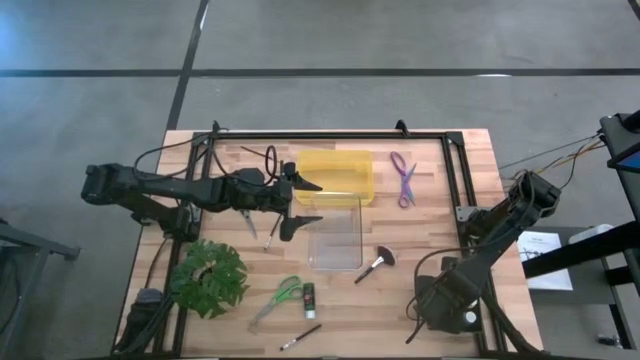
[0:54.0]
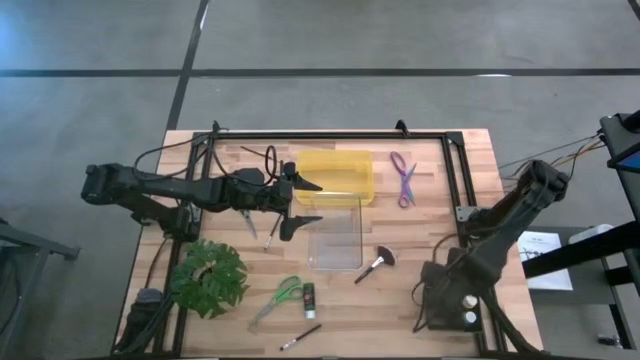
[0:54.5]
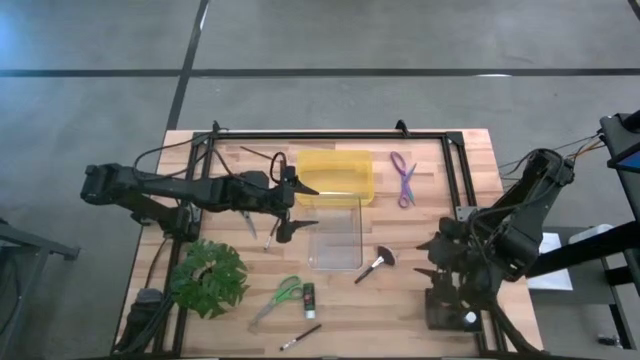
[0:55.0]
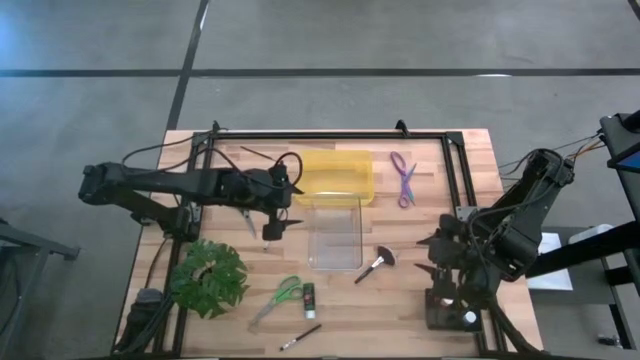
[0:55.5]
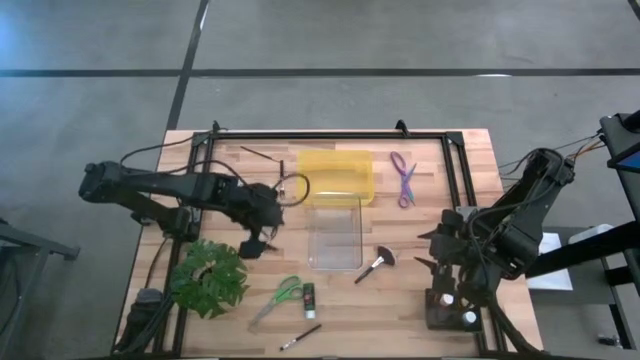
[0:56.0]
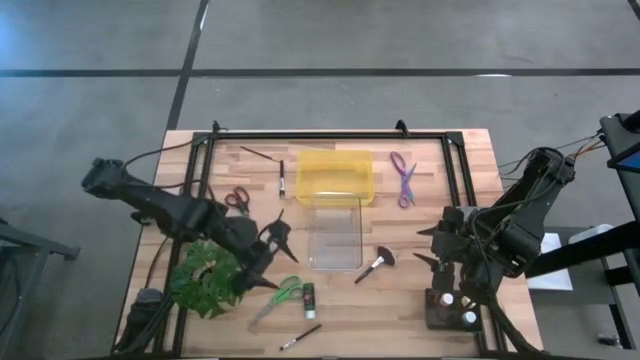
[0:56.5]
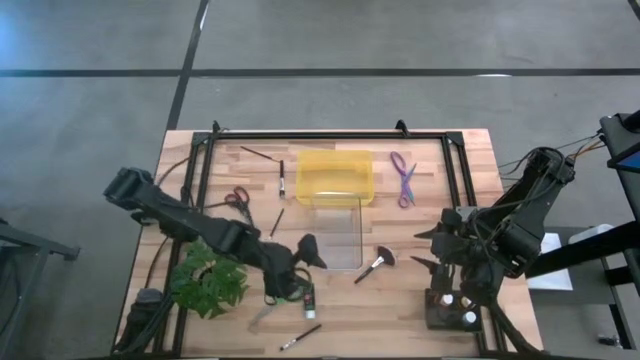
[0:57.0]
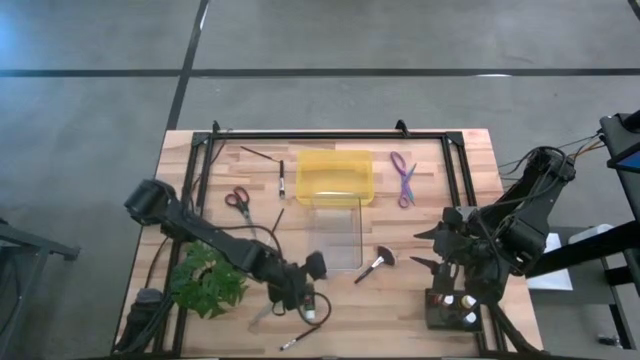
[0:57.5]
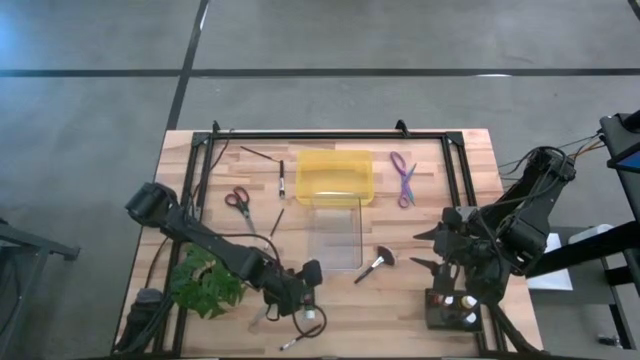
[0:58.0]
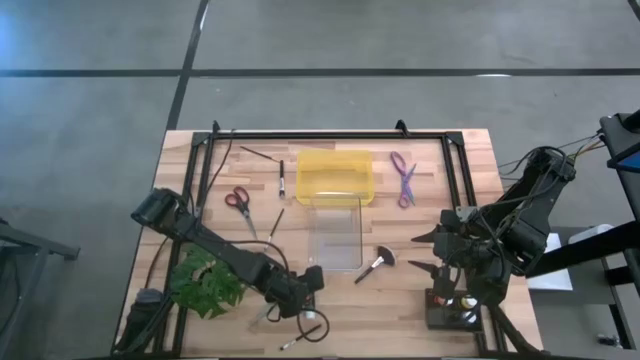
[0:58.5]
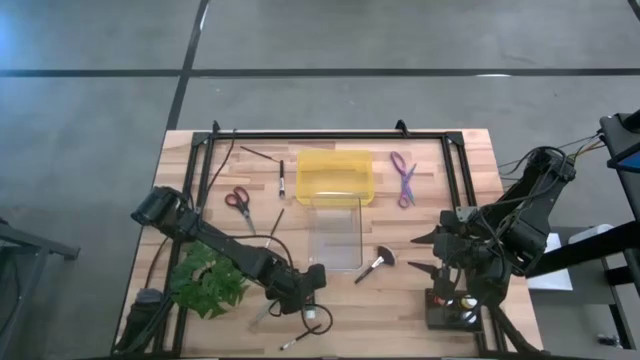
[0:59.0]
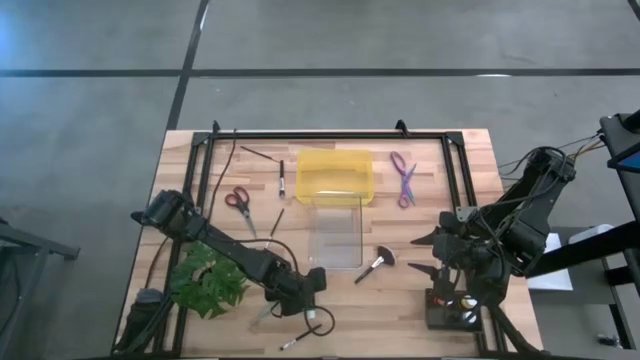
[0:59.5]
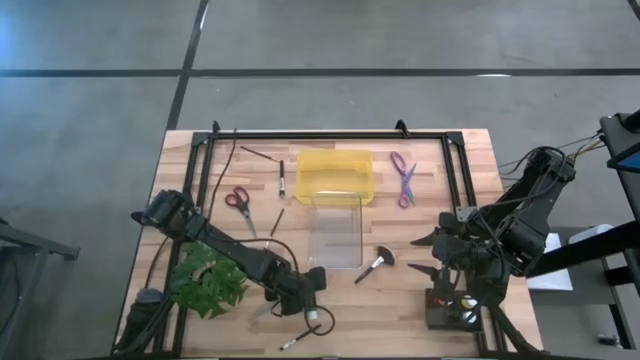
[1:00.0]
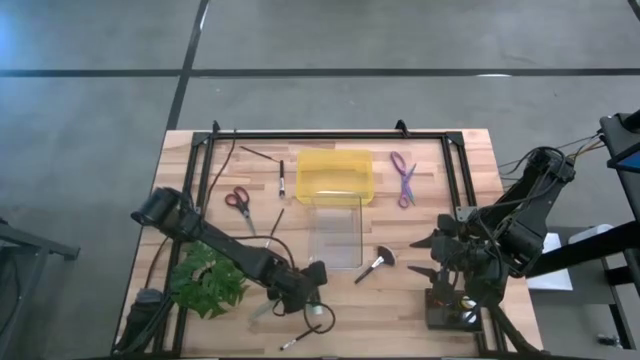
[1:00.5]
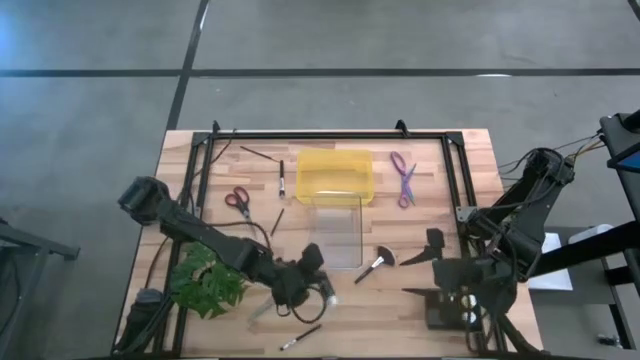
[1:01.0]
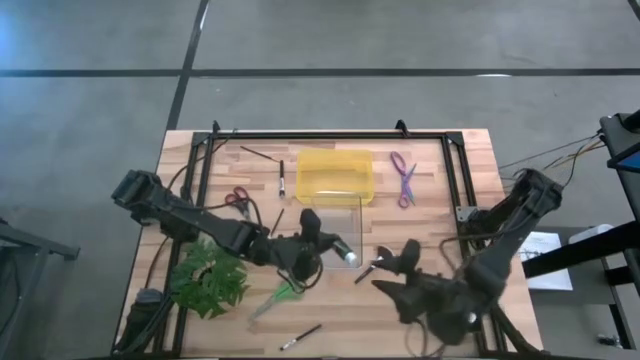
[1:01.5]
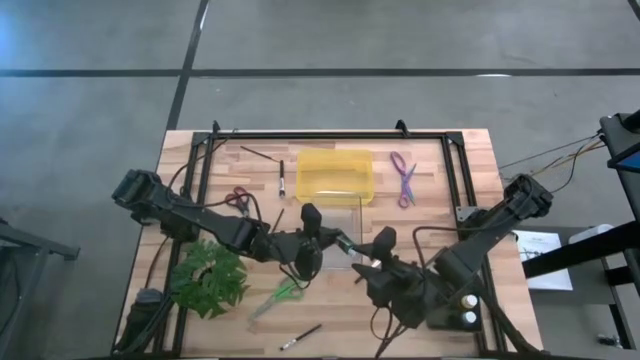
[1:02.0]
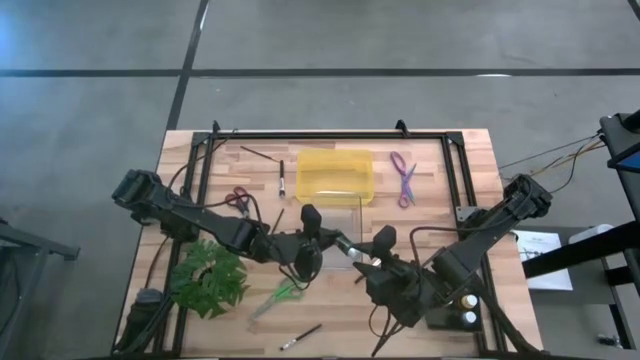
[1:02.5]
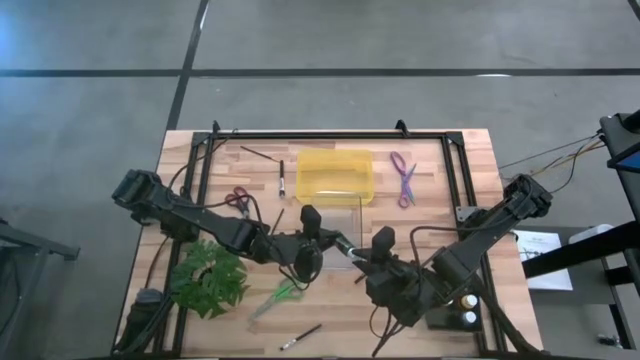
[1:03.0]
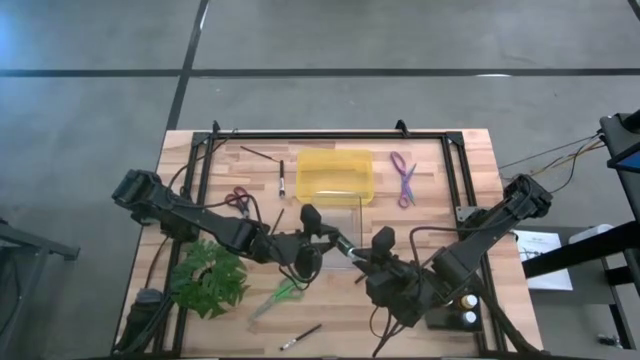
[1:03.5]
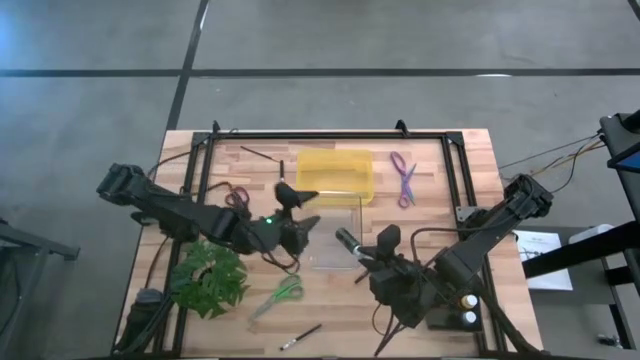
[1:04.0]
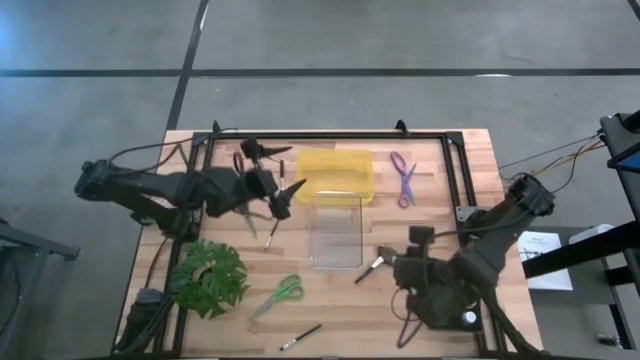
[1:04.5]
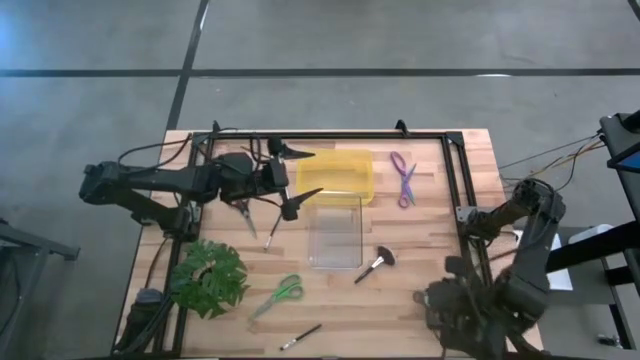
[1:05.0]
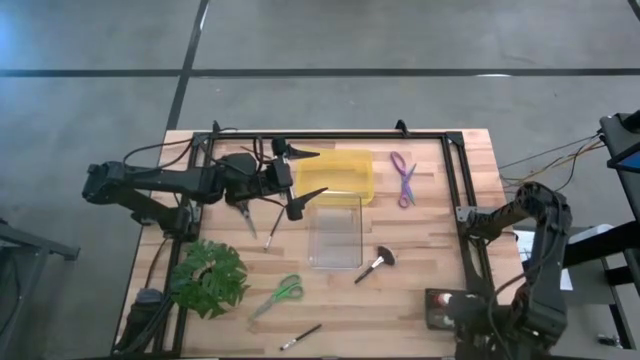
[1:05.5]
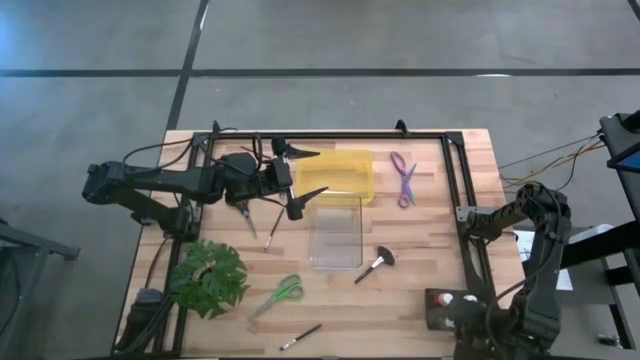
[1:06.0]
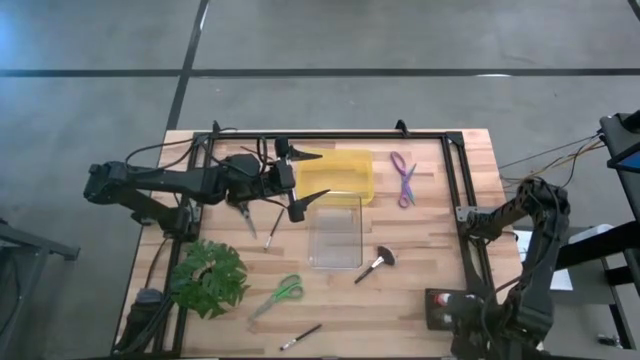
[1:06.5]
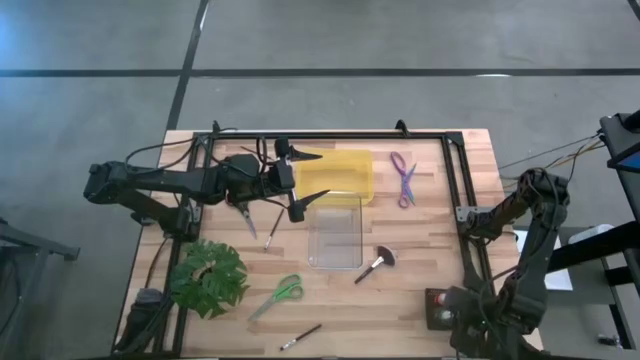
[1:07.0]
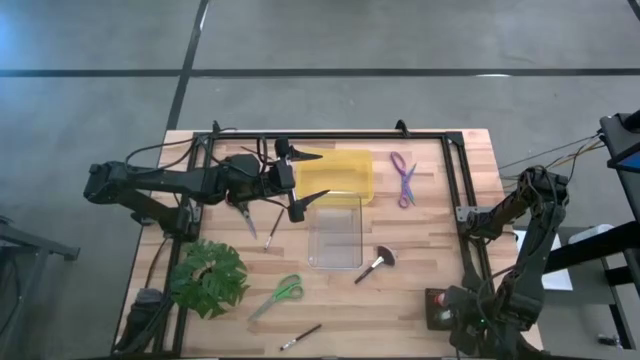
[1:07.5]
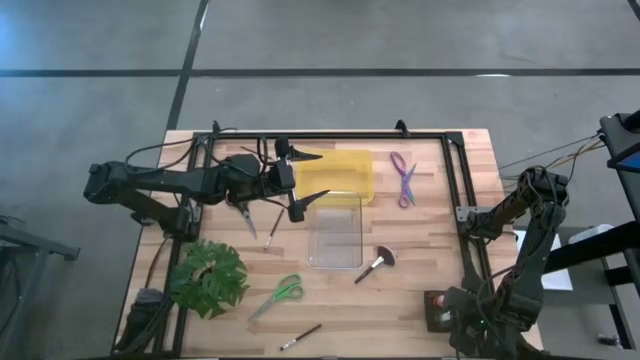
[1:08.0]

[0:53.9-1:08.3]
Task: Pick & Place Paint Supplies
Put the green paint bottle into the black bin

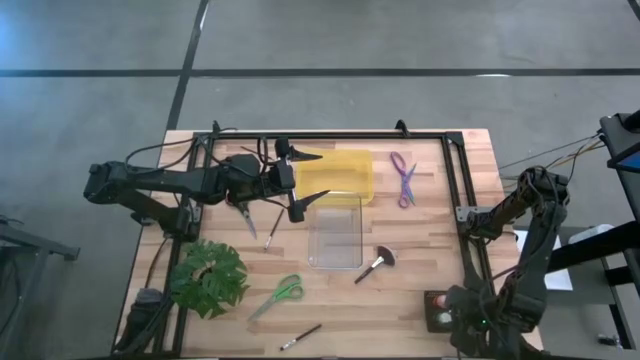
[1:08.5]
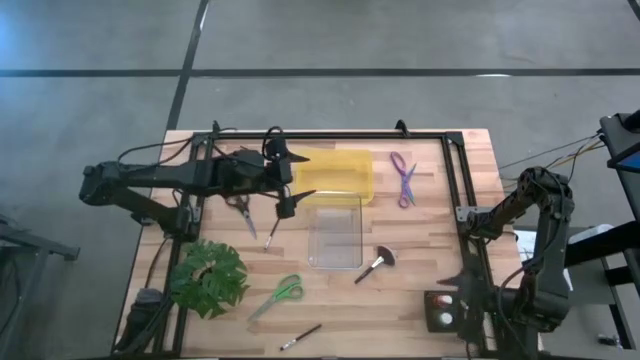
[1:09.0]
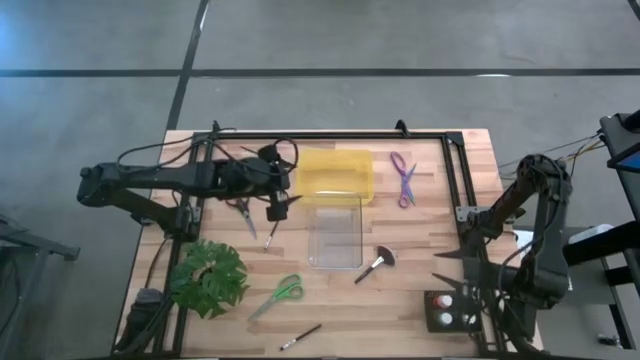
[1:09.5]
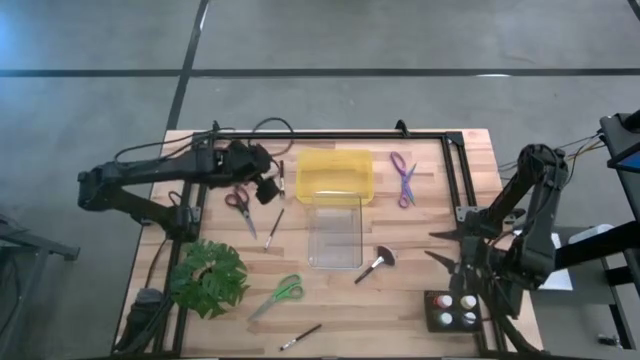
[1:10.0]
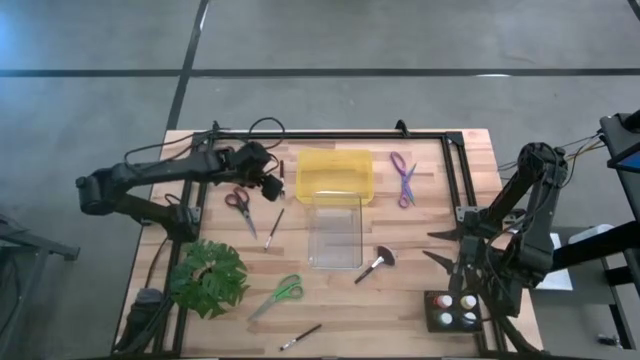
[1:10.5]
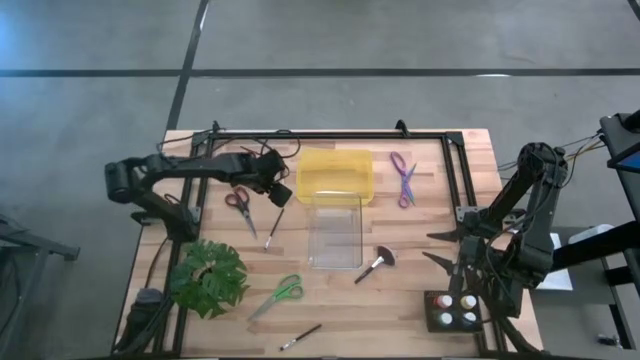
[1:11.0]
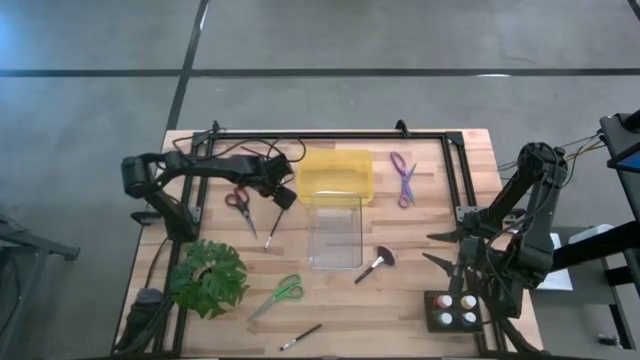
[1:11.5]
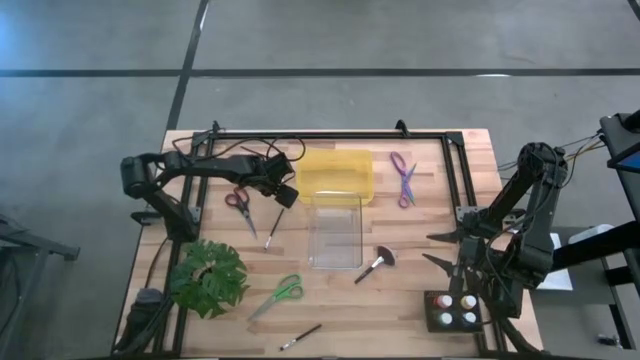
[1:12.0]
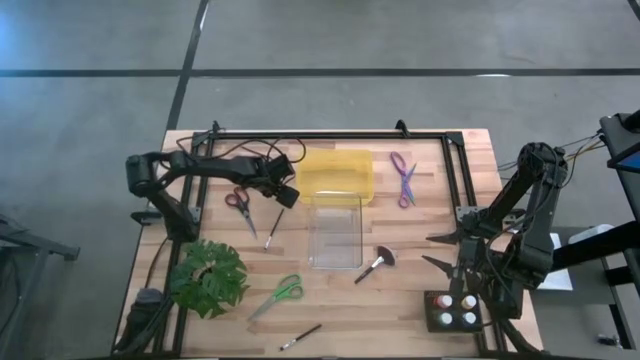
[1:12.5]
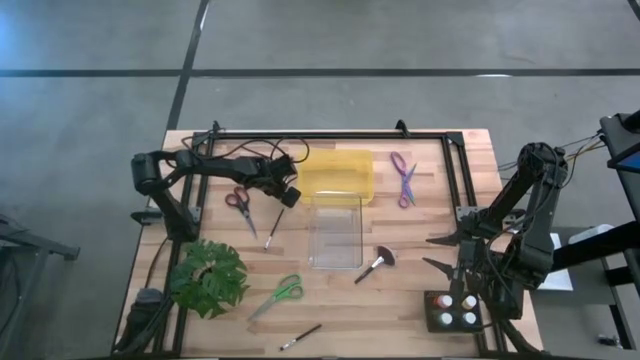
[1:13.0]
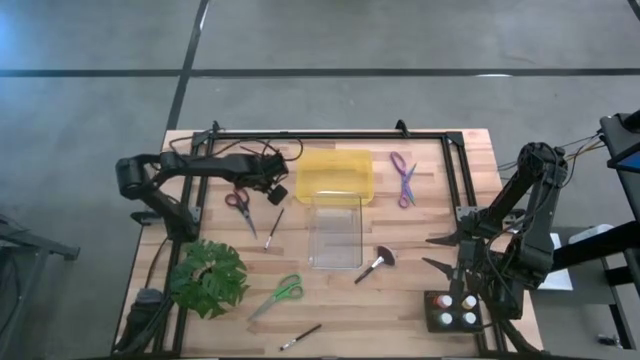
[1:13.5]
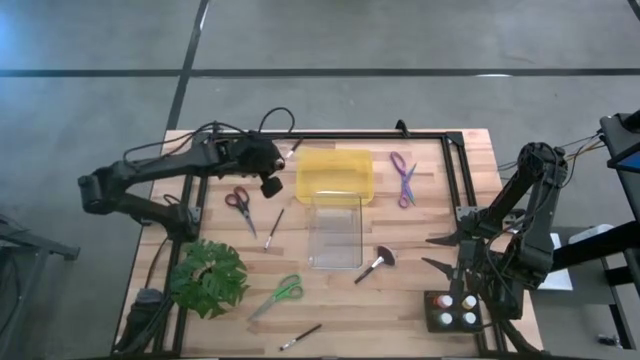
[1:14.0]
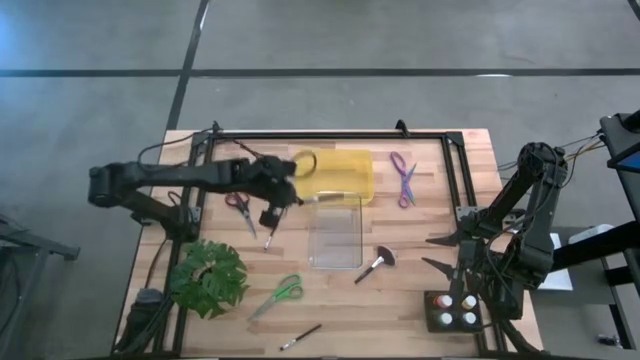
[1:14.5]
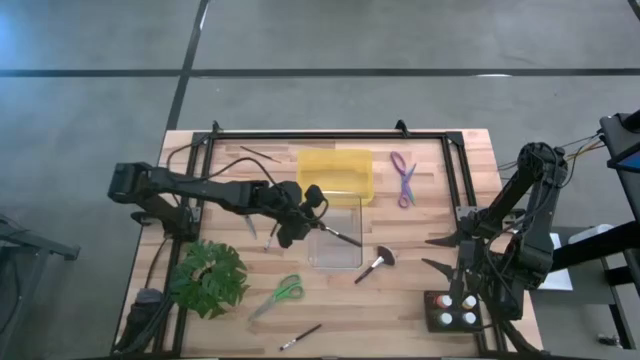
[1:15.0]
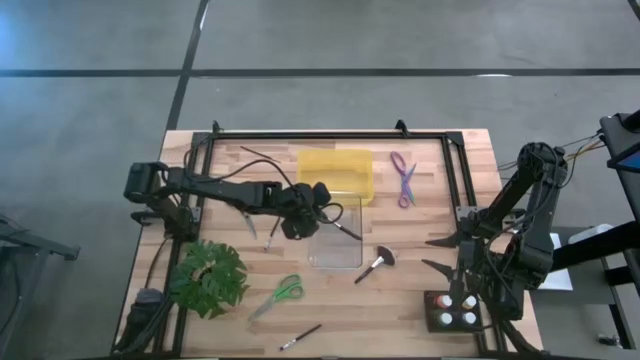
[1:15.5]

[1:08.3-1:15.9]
Put the silver blush brush into the transparent bin
